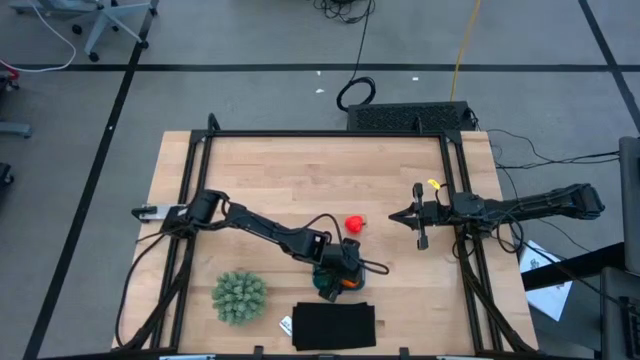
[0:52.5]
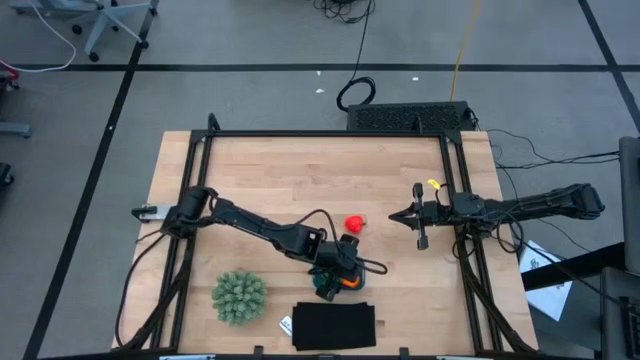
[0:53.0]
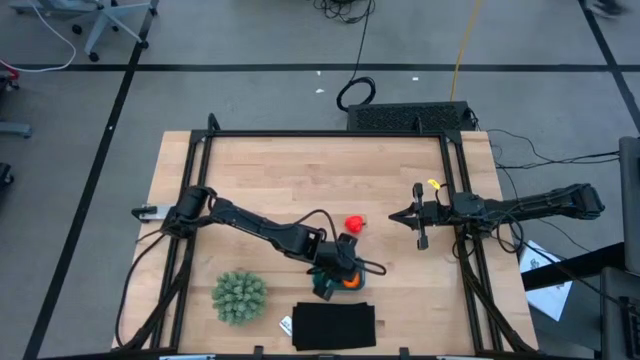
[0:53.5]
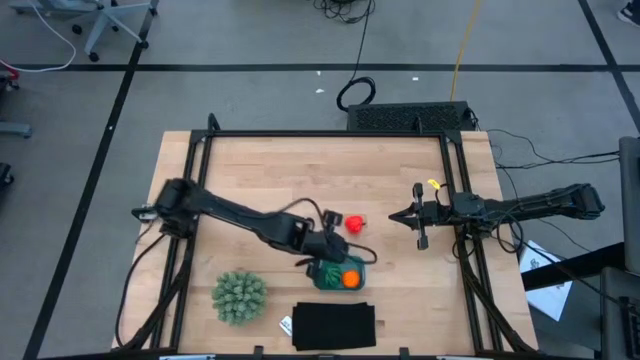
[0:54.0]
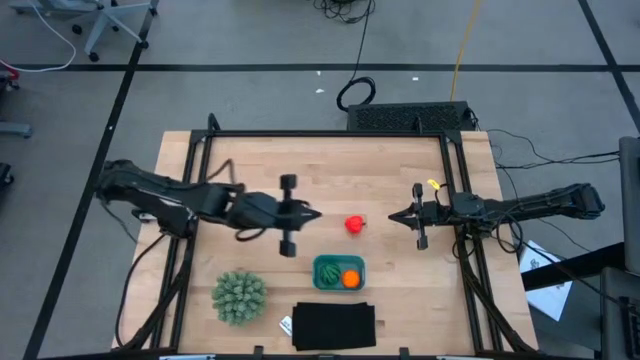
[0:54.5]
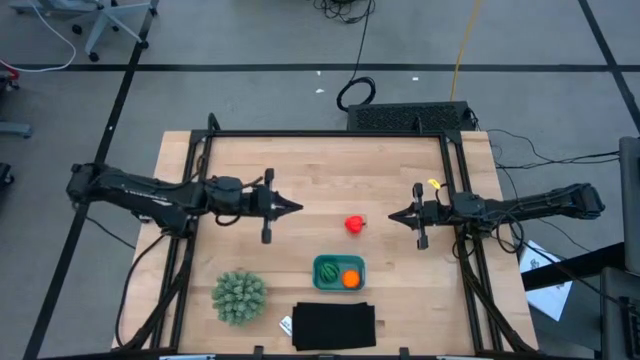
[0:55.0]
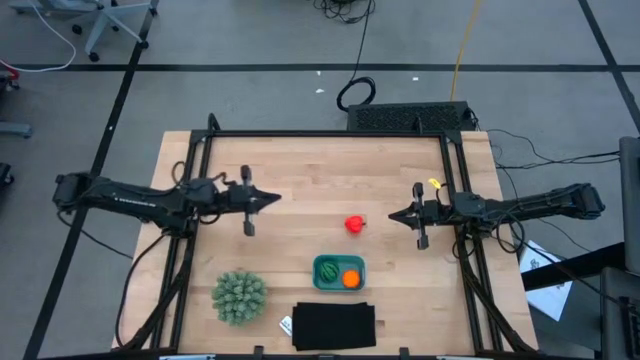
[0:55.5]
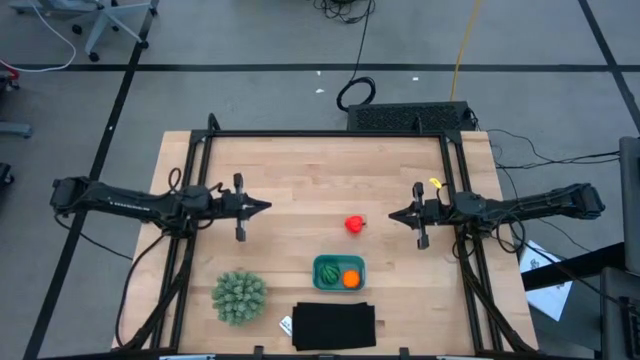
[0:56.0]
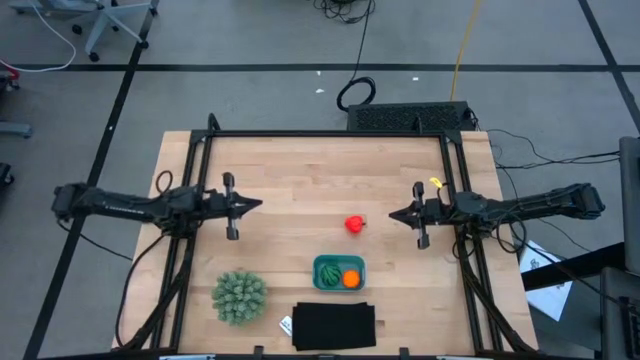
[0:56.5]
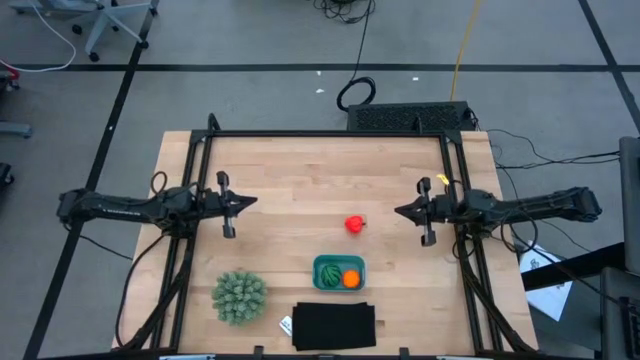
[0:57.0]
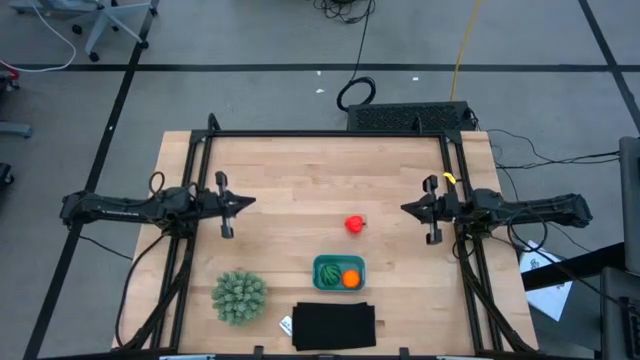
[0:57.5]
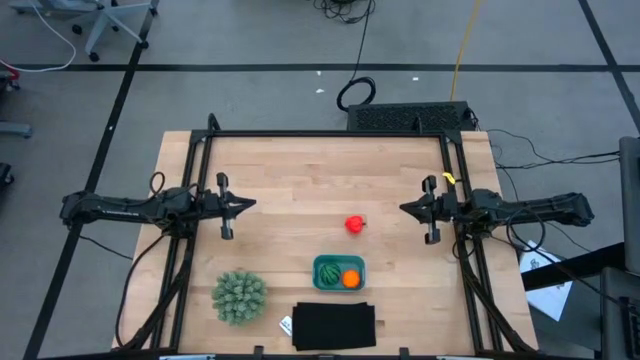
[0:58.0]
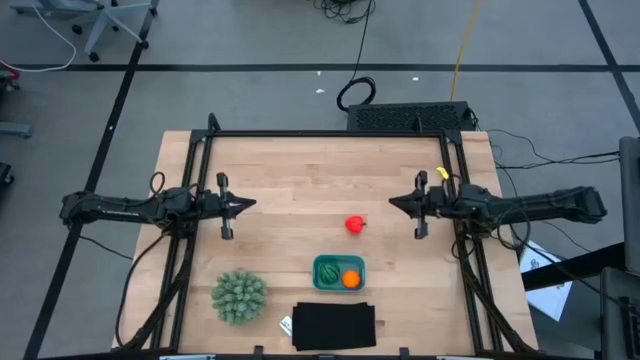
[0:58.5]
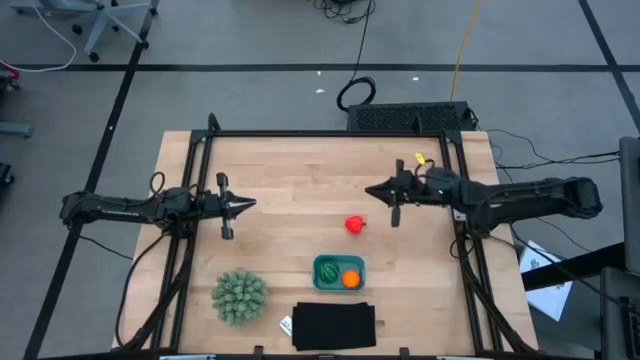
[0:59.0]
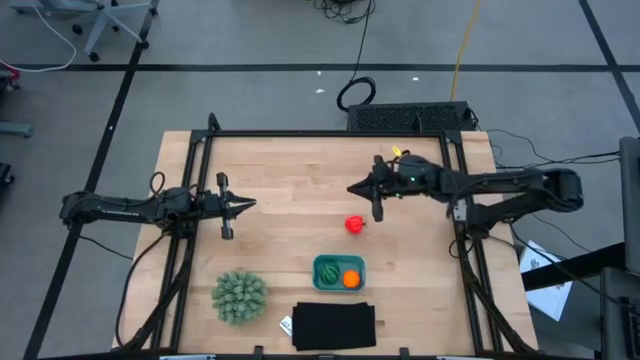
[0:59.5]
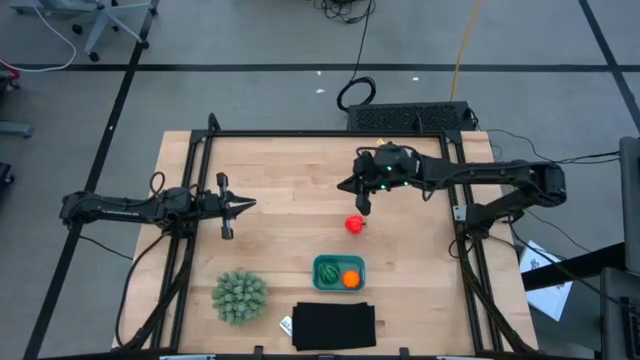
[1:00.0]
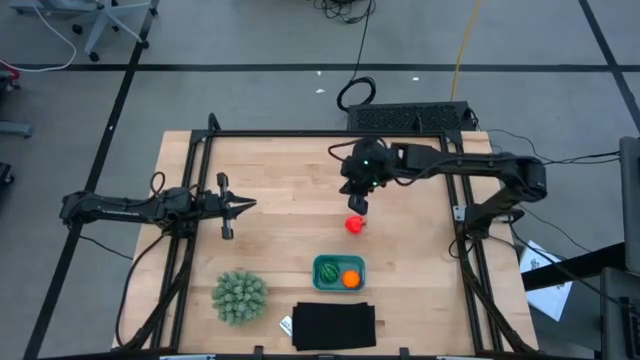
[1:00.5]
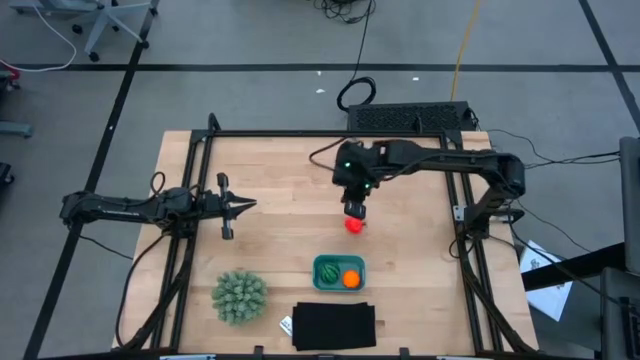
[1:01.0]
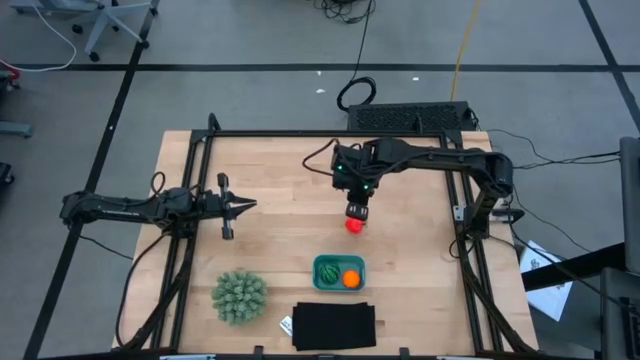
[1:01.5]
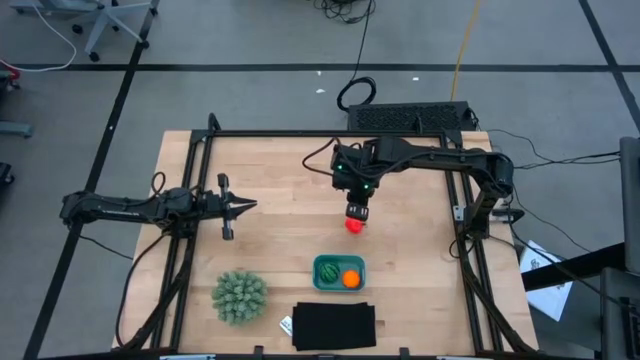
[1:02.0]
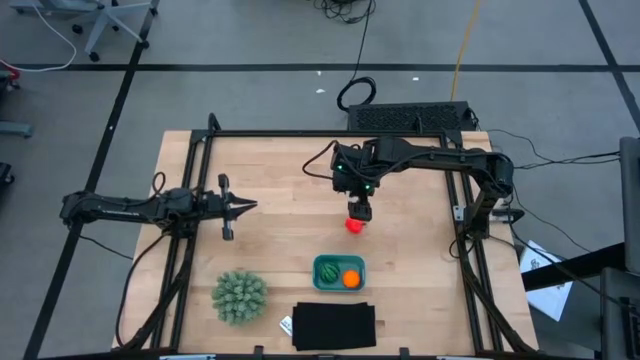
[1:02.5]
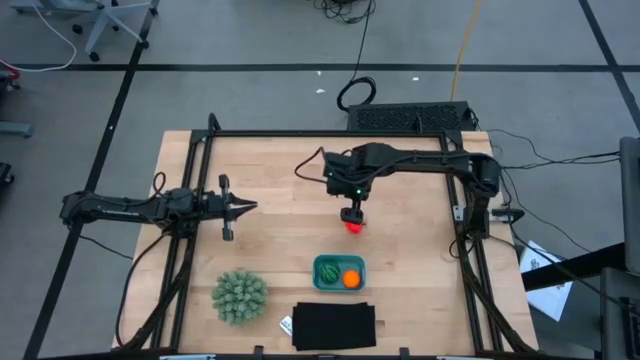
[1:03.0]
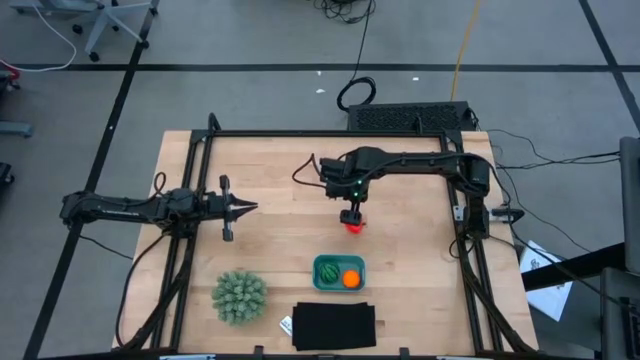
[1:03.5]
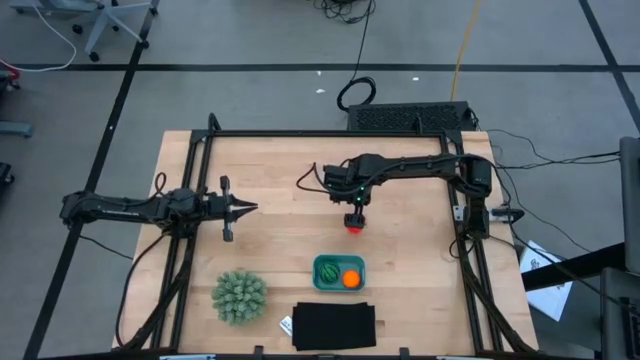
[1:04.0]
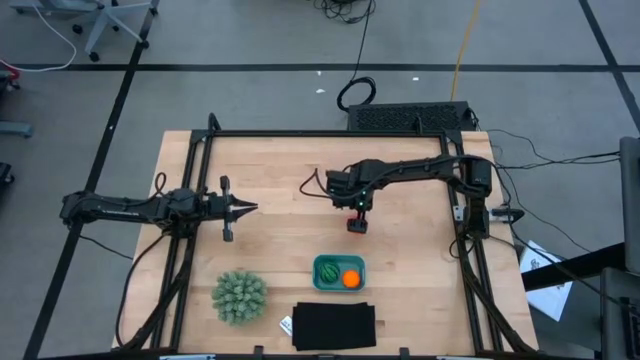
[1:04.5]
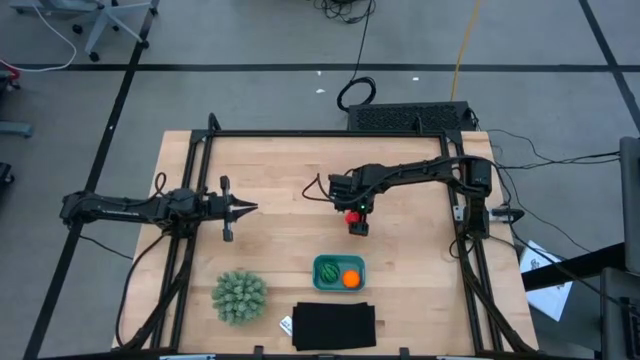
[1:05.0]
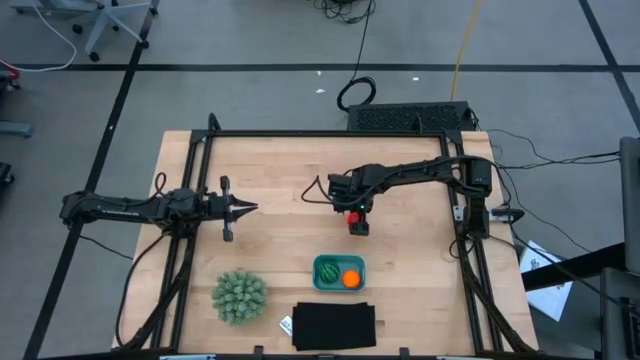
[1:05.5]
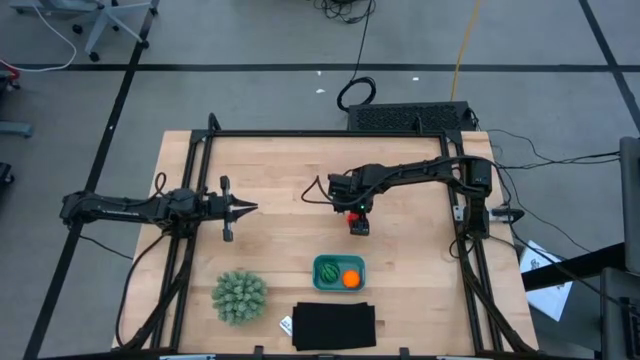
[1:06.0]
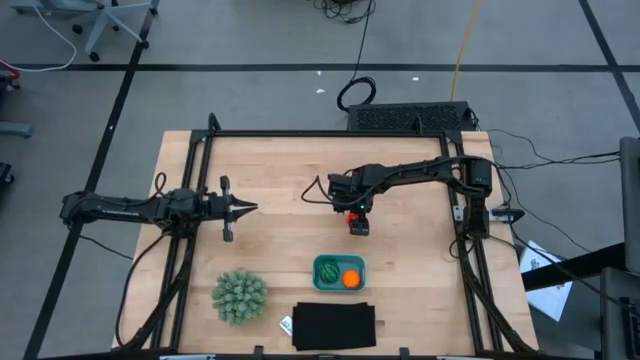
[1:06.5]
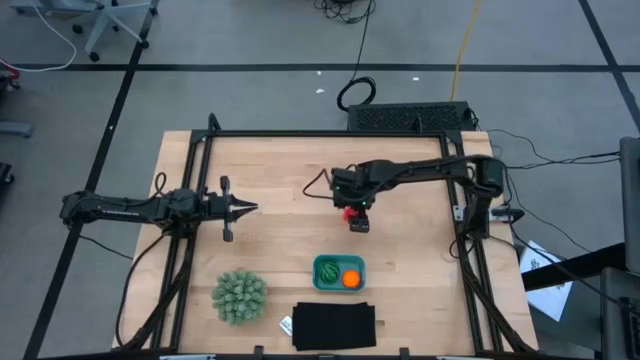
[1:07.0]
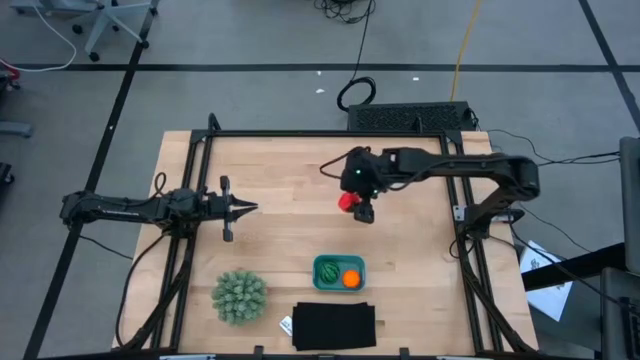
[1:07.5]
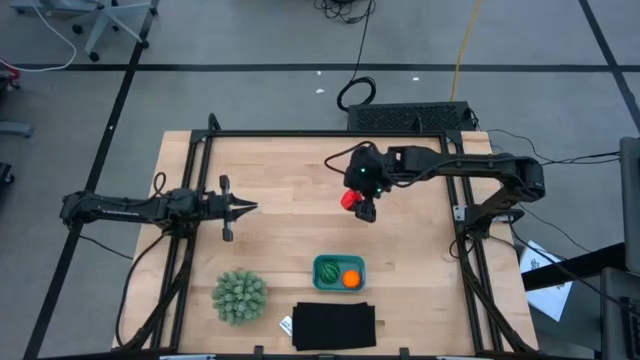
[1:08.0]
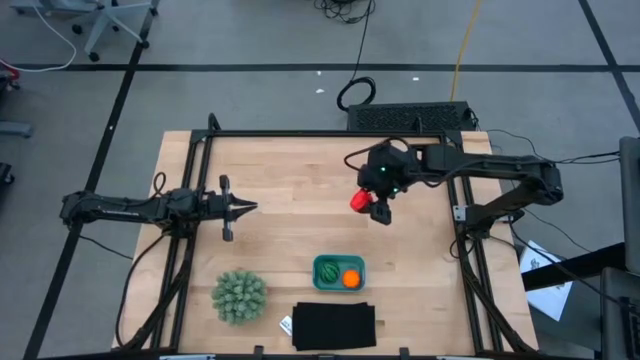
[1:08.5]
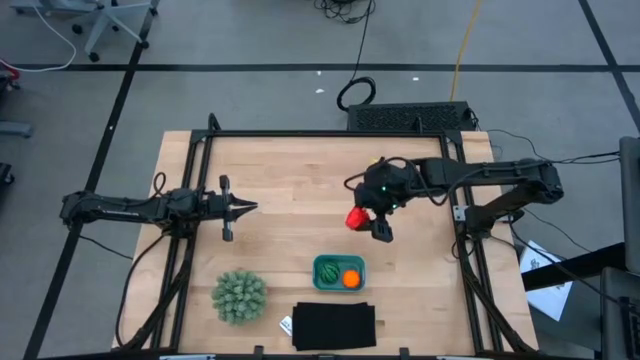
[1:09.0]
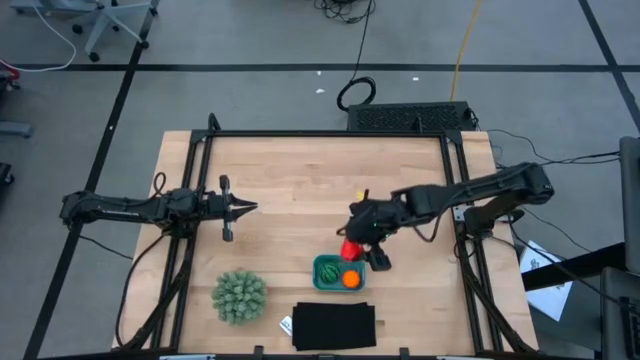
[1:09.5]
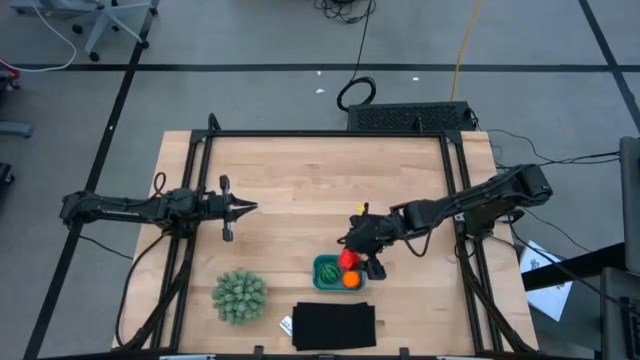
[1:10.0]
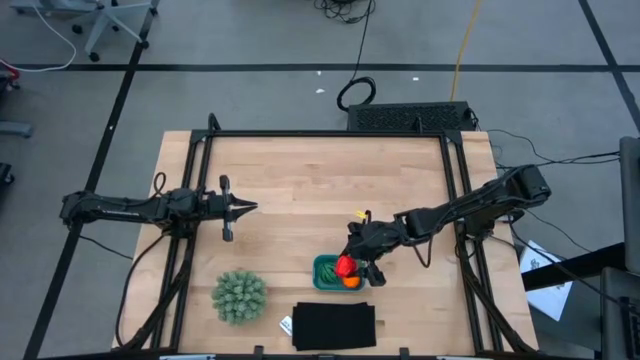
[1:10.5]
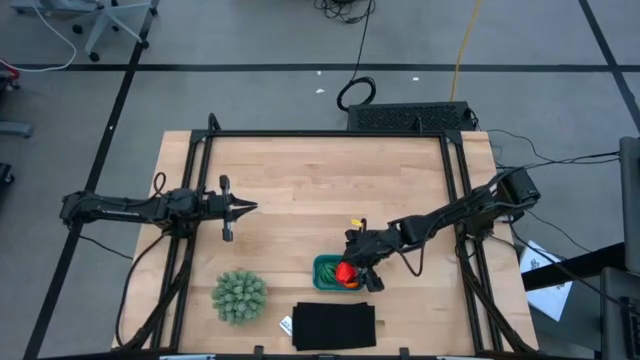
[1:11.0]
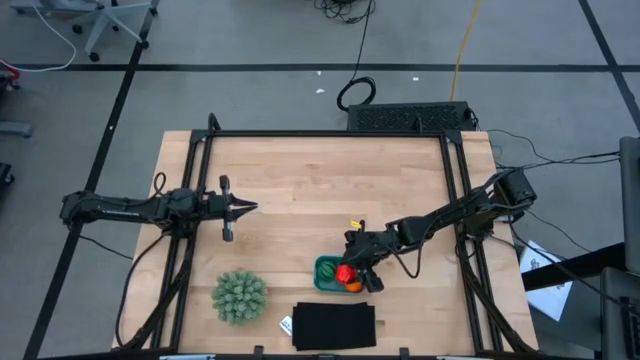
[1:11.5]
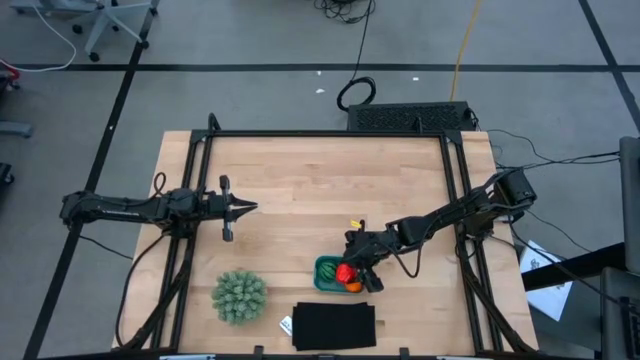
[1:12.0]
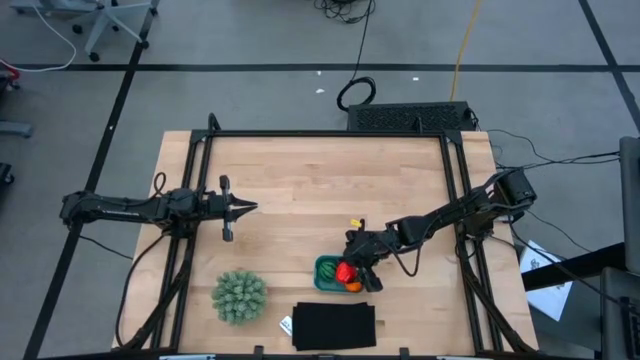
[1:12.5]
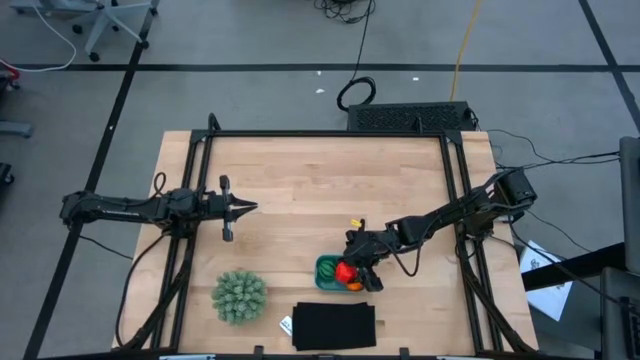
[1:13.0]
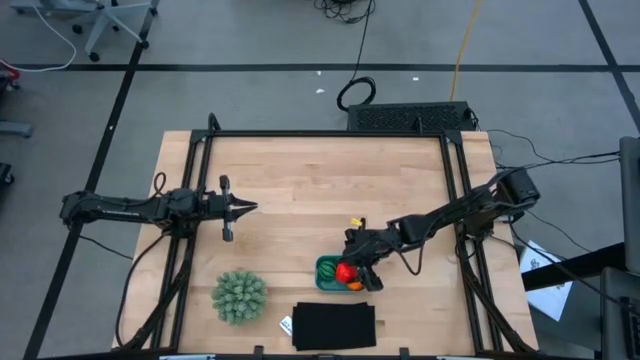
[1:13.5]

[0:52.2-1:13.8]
Task: Pick and placing Produce into tupperware
Put the red apple into the blue bin
